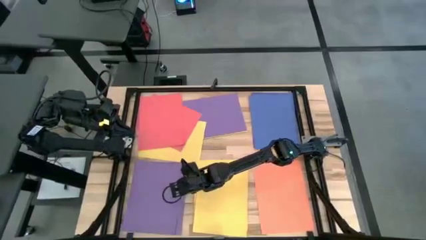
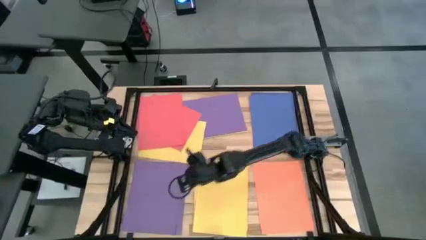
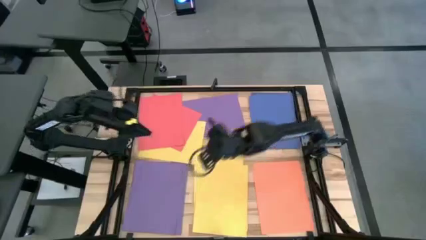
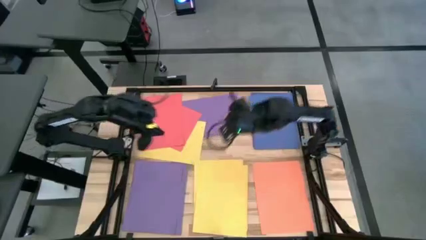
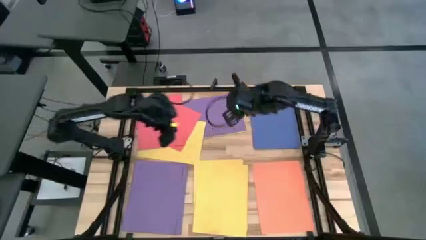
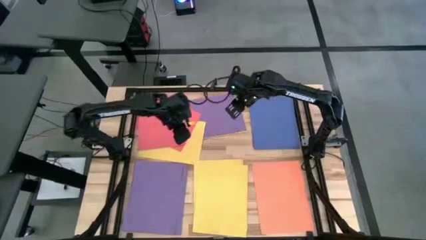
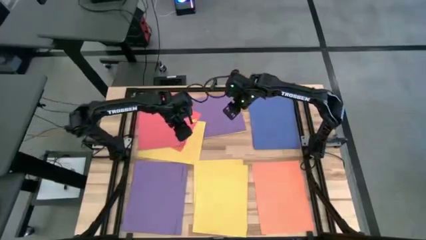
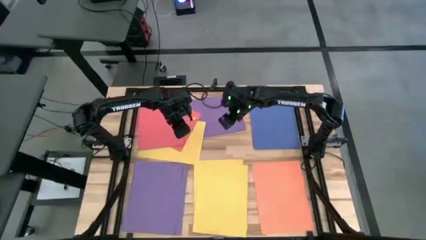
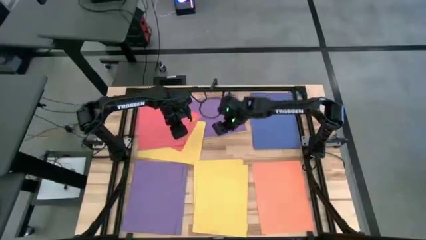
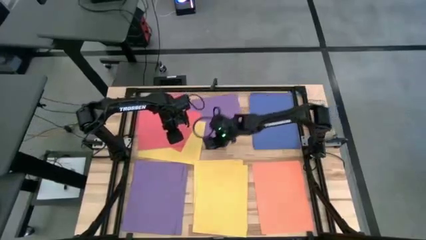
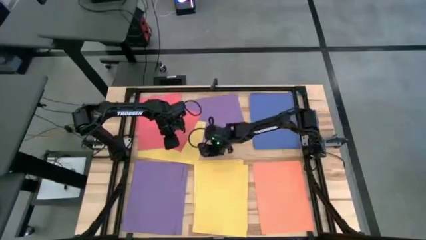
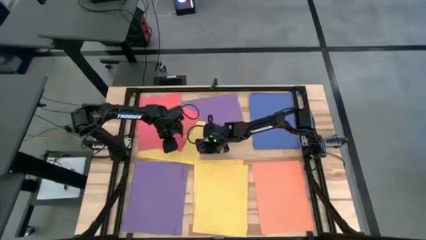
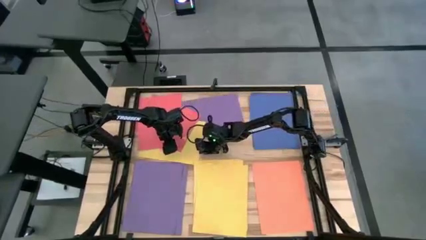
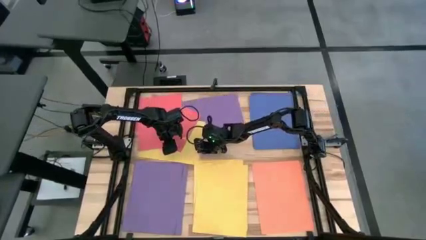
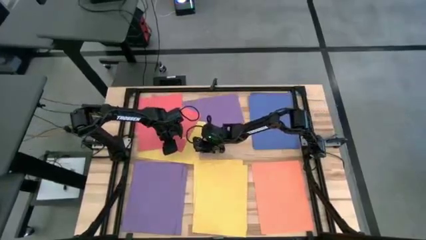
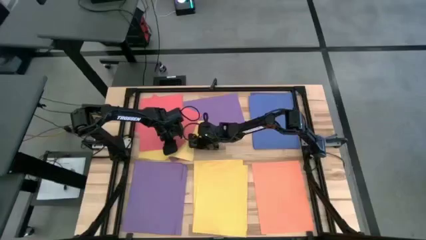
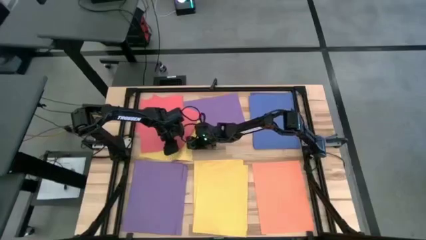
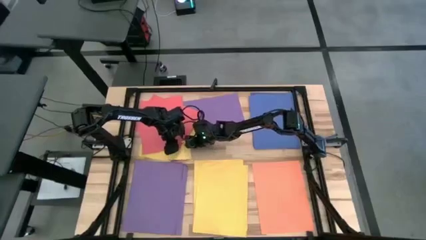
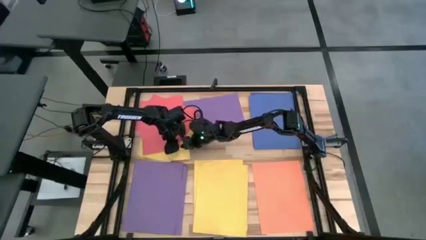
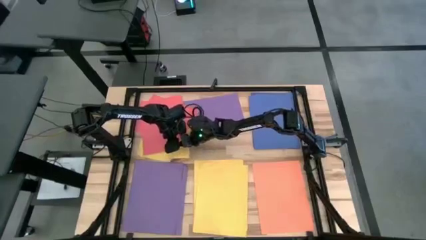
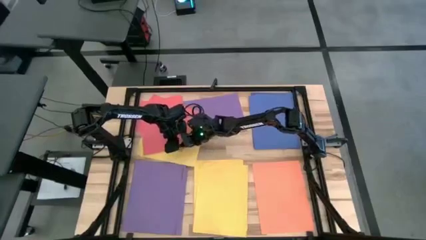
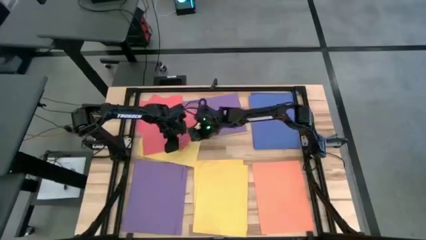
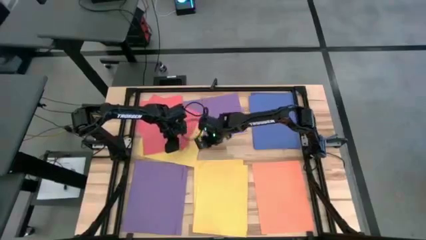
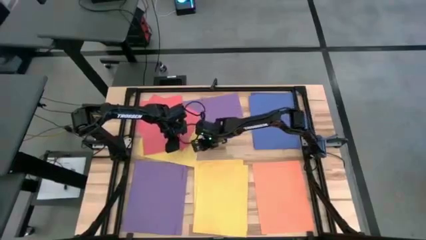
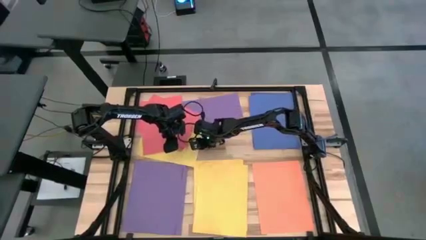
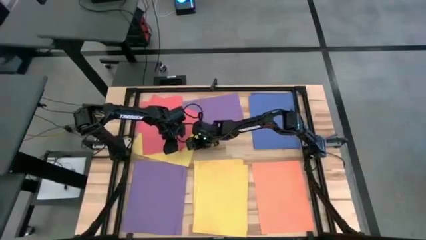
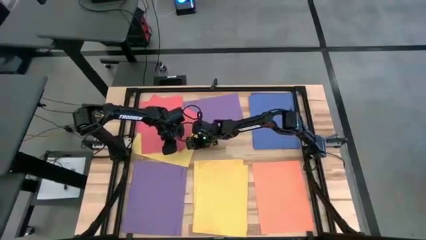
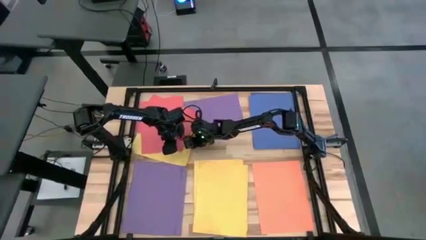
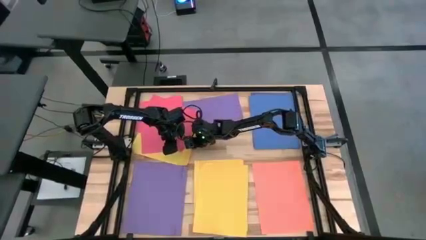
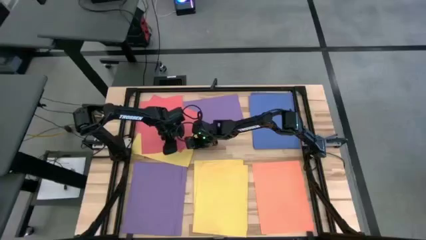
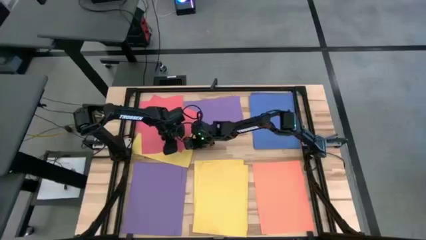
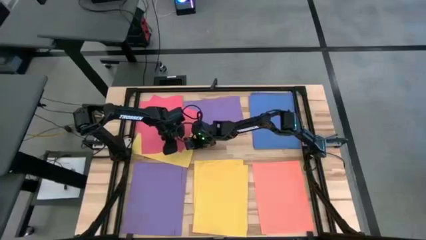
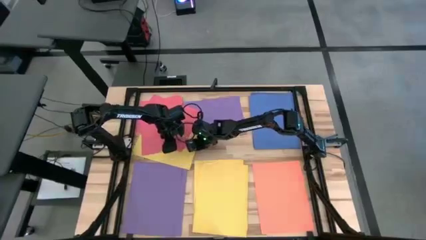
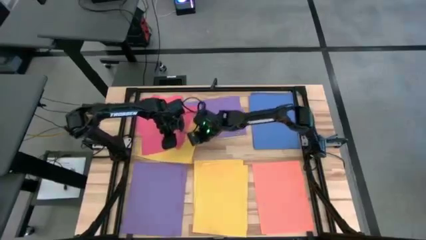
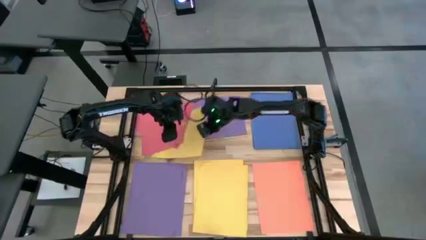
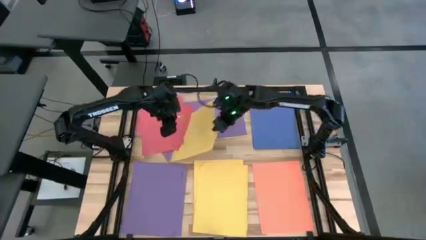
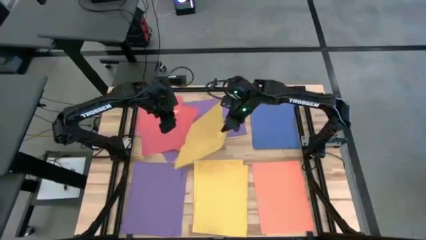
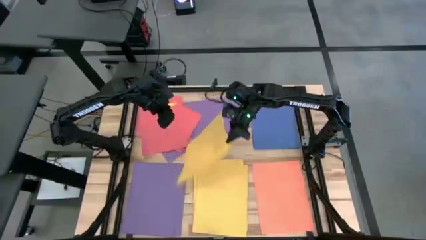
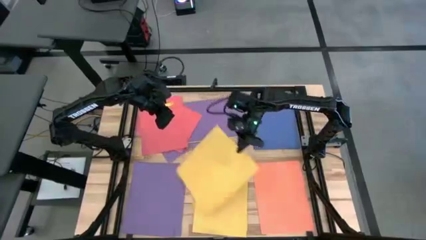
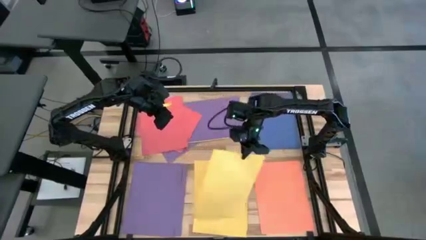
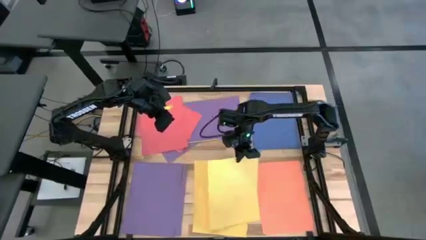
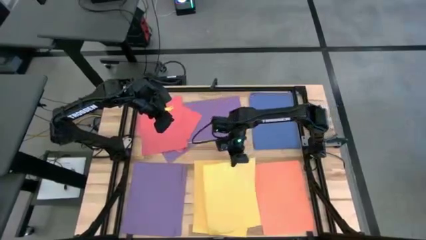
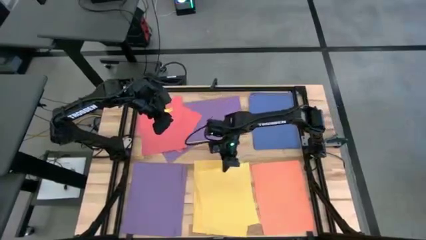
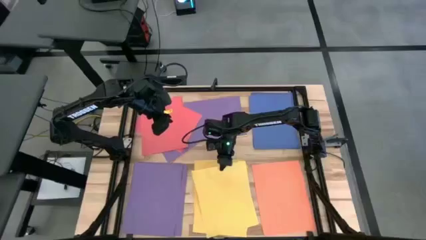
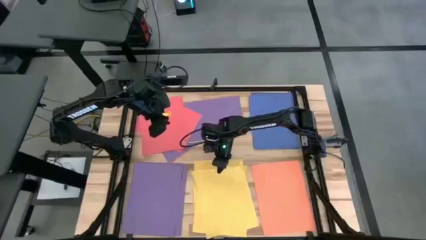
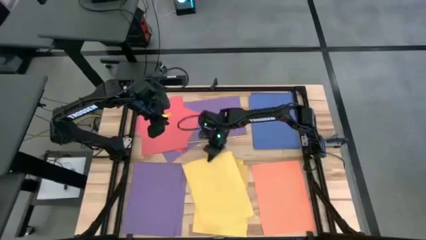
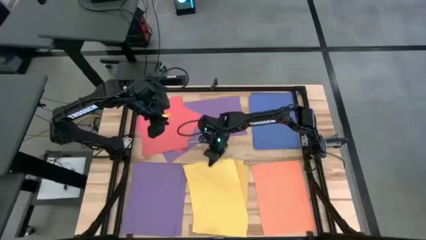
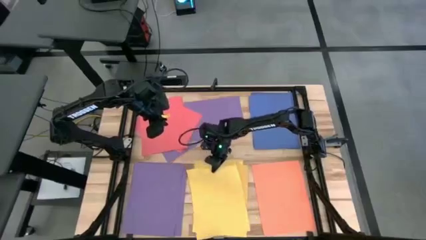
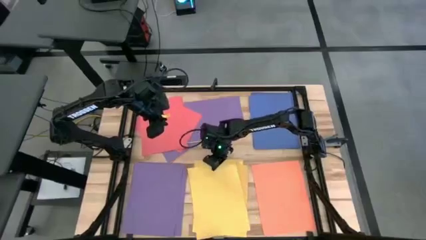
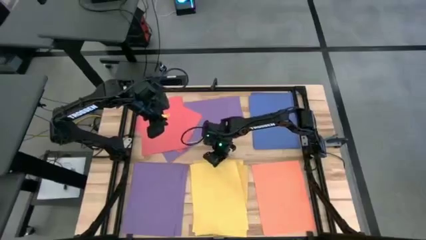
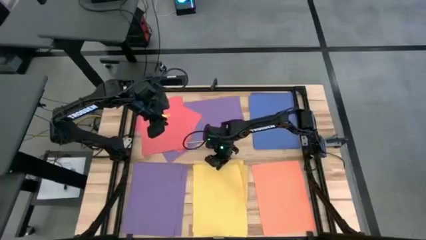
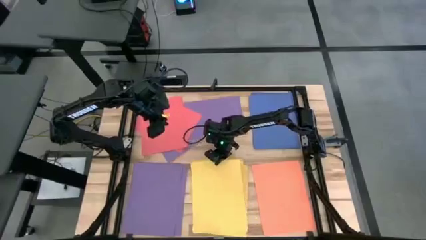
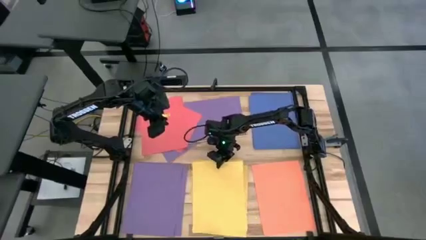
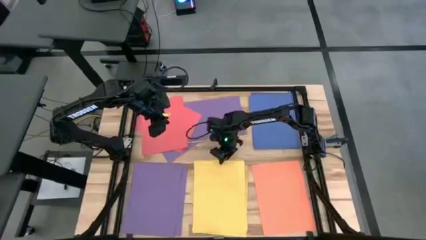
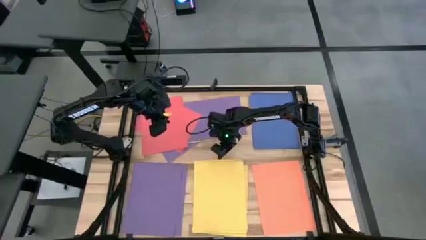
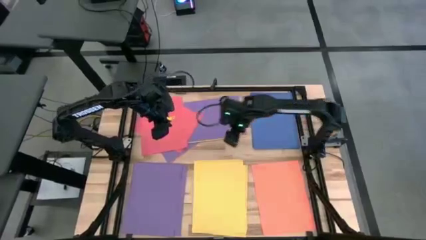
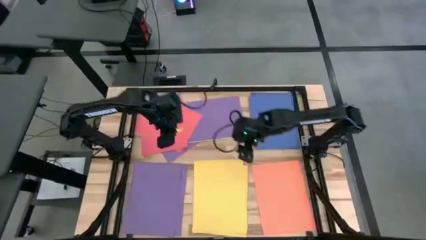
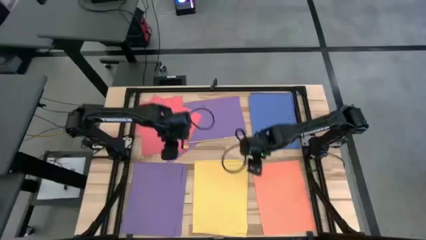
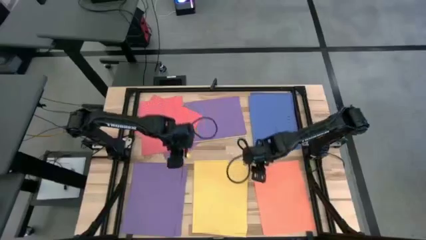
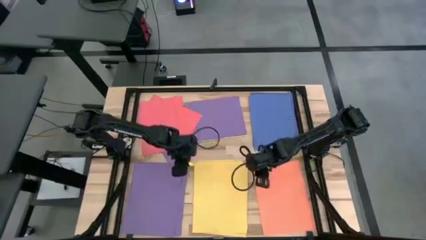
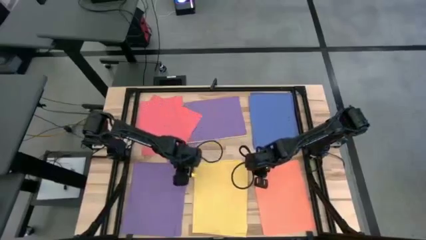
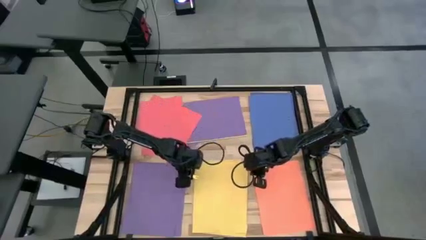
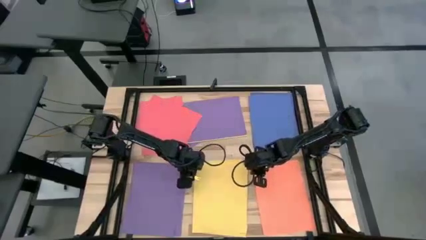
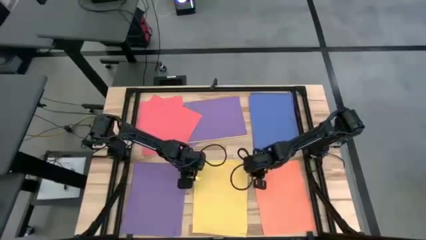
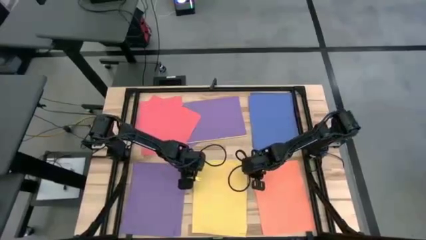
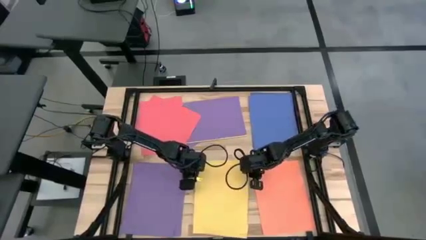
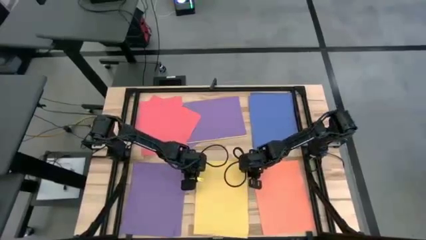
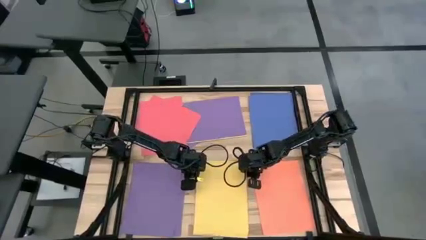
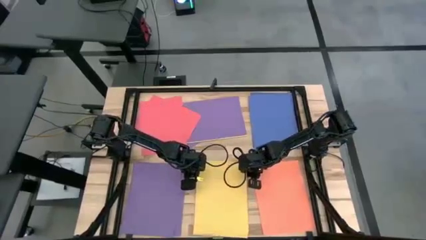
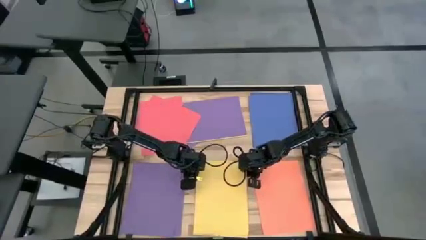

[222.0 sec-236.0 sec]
Task: Organize paper
Stack the yellow paper on top of the yellow paper
